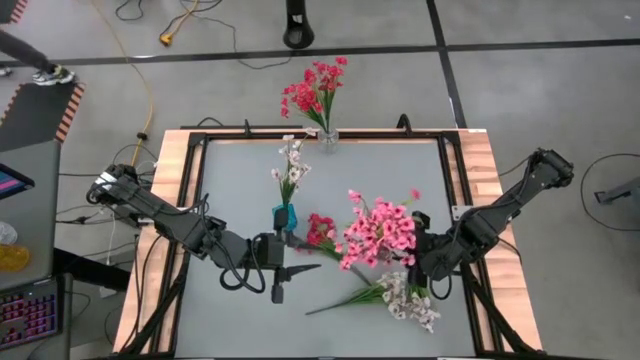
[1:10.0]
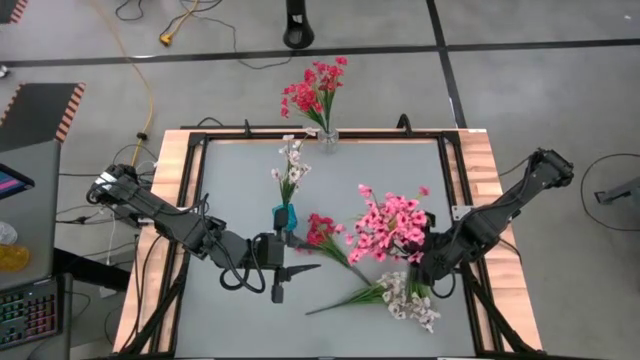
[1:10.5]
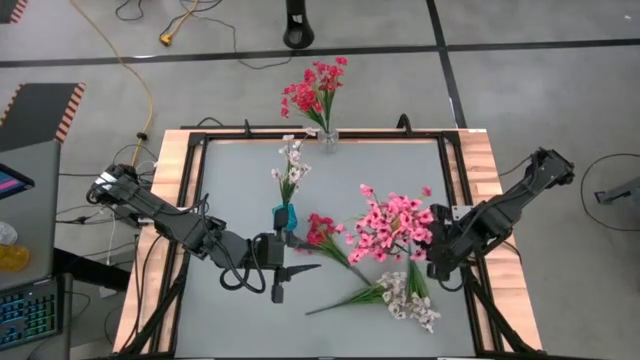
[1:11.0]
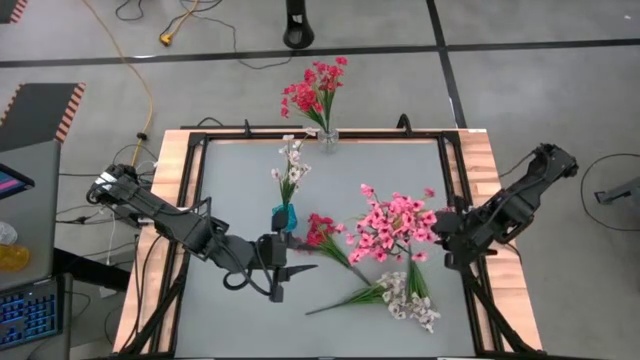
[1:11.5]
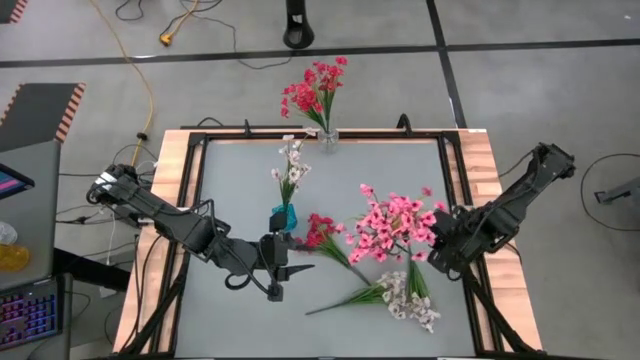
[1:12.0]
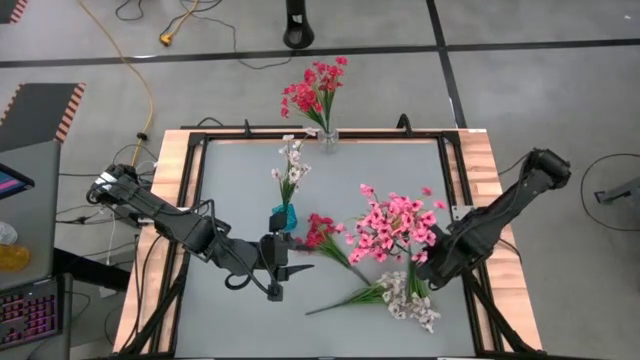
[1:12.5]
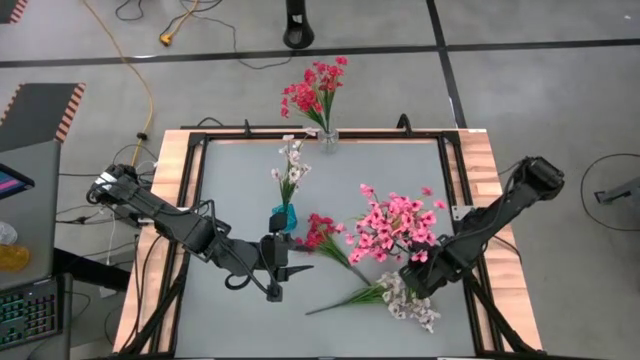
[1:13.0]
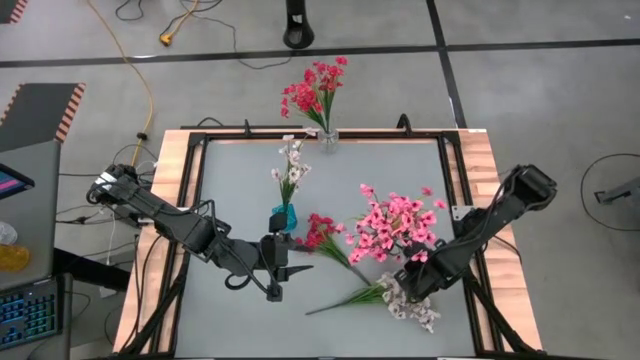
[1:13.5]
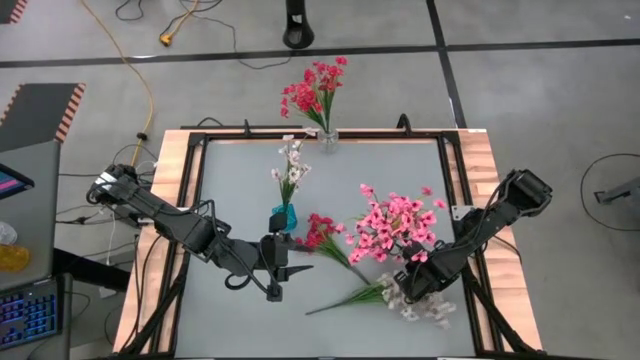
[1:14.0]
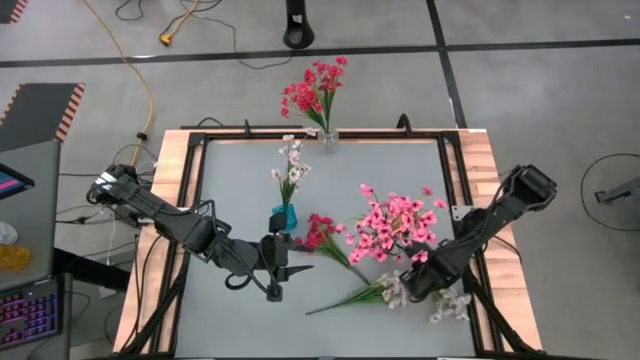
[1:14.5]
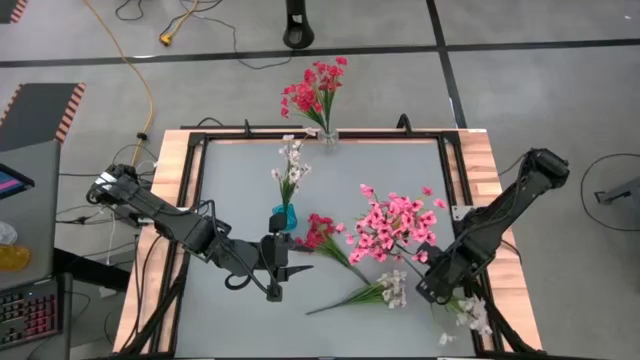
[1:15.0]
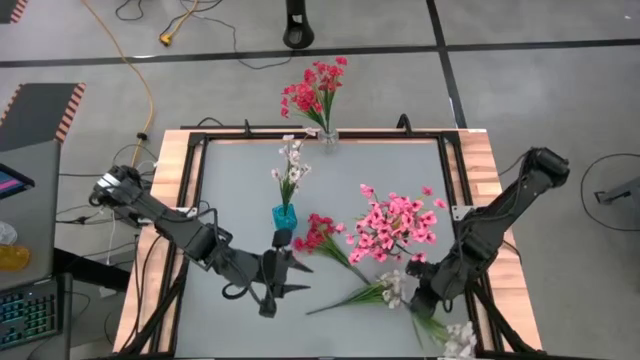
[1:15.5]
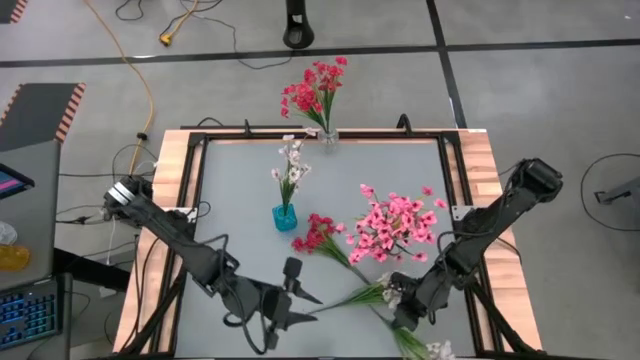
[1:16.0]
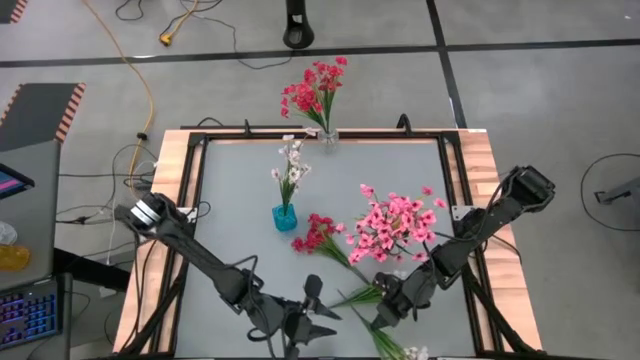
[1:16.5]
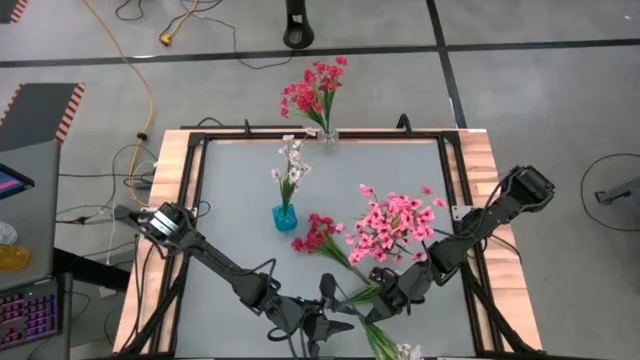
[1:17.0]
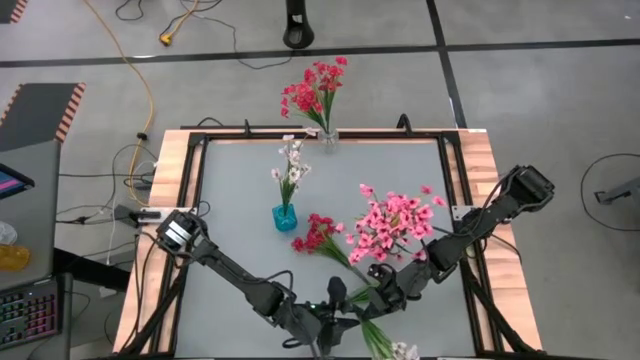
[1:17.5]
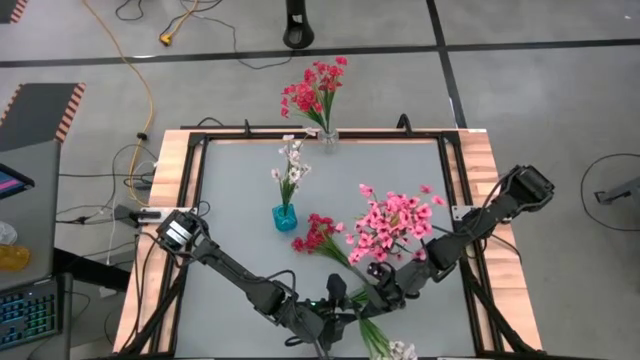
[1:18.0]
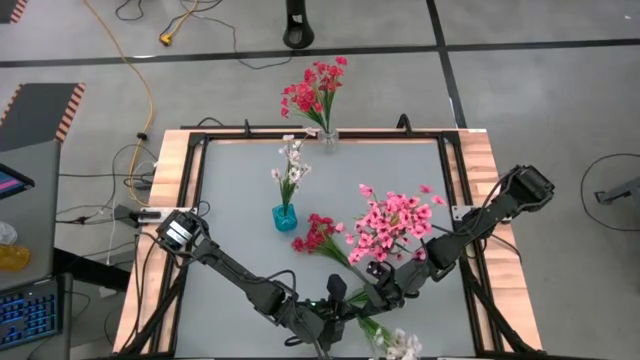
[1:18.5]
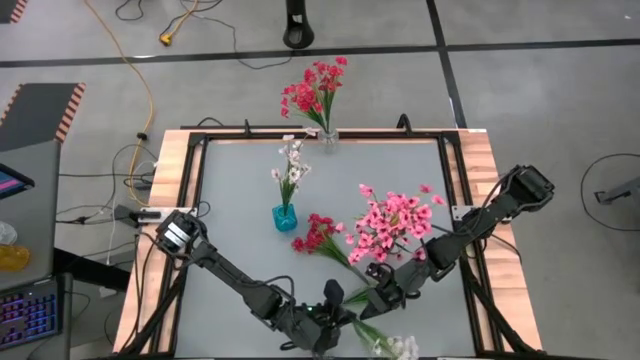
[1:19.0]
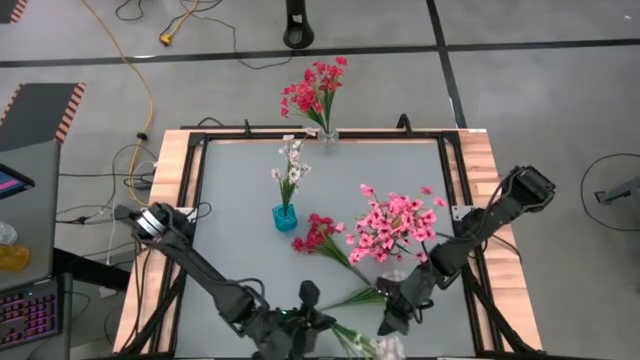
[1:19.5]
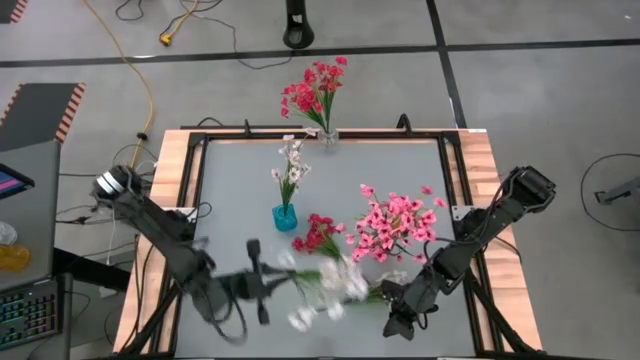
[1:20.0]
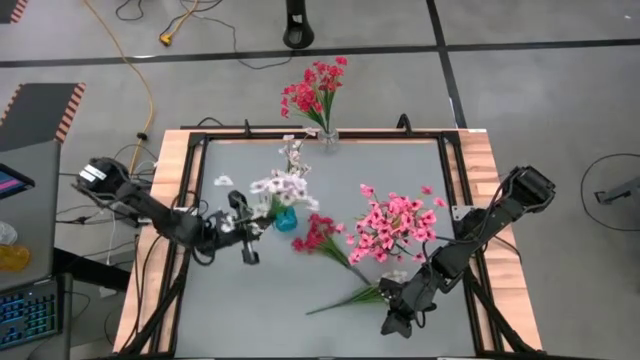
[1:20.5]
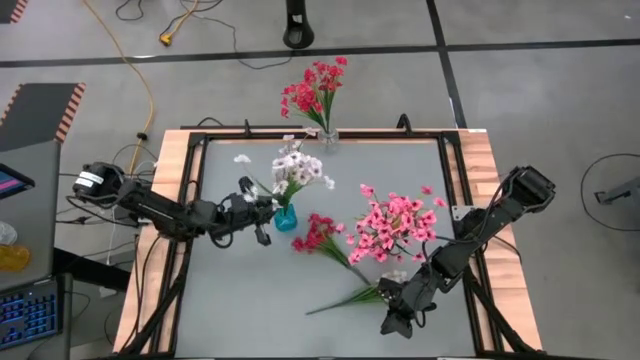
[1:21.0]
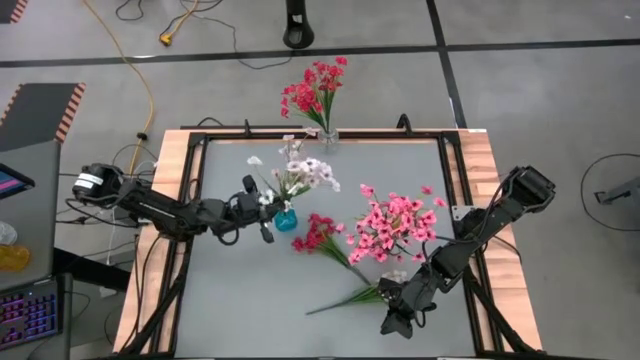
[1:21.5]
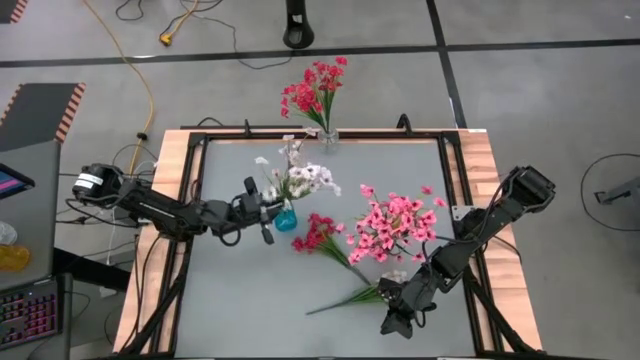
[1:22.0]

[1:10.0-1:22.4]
Task: Sort flowers into vase by color
Put the right white flower into the blue vase

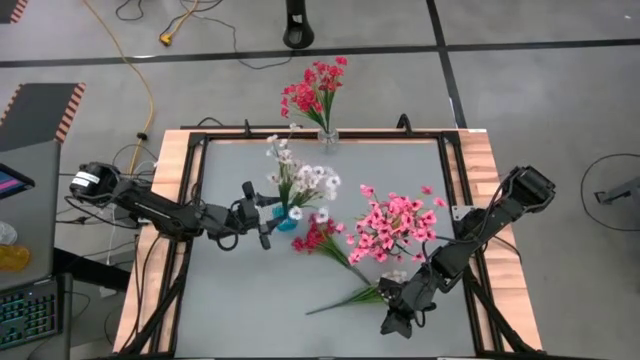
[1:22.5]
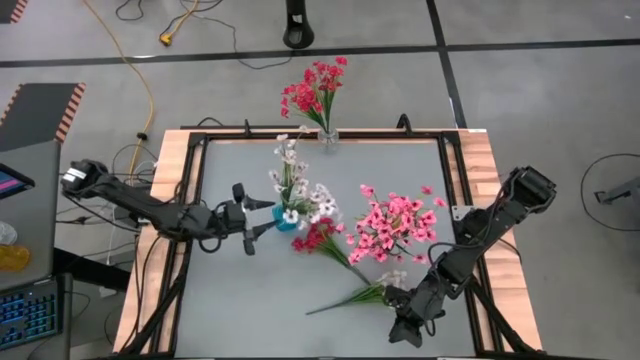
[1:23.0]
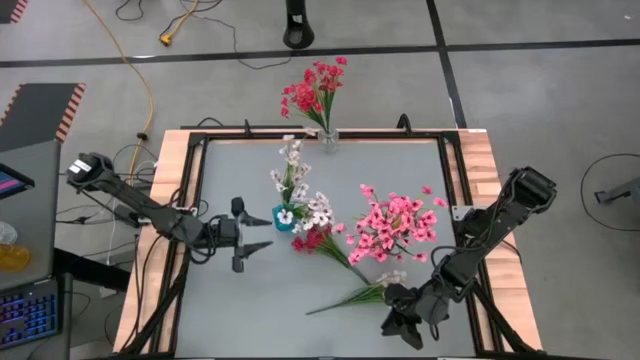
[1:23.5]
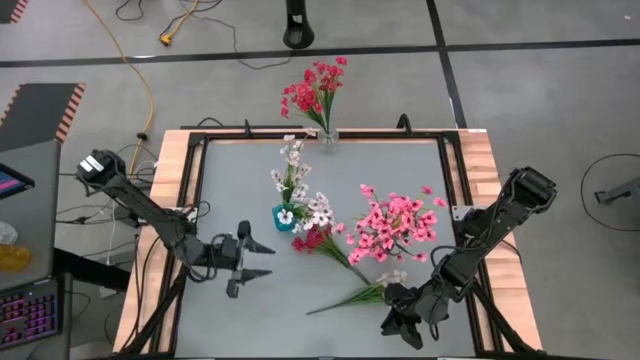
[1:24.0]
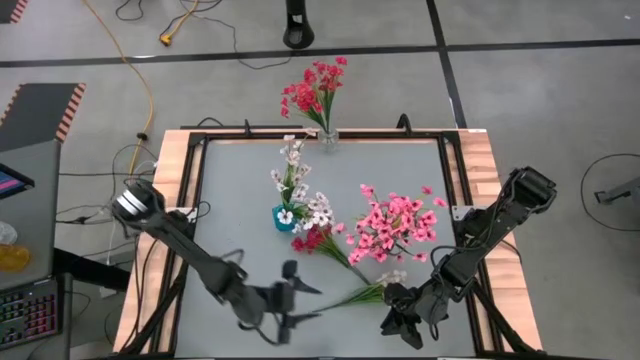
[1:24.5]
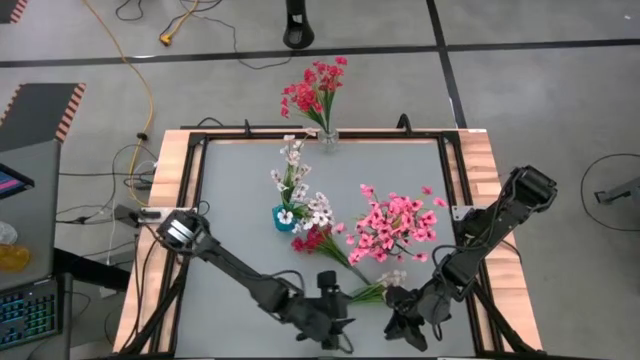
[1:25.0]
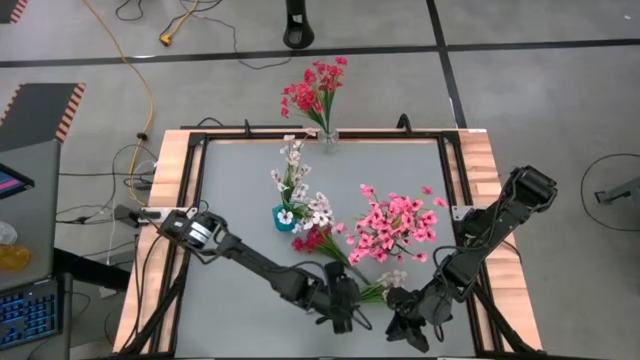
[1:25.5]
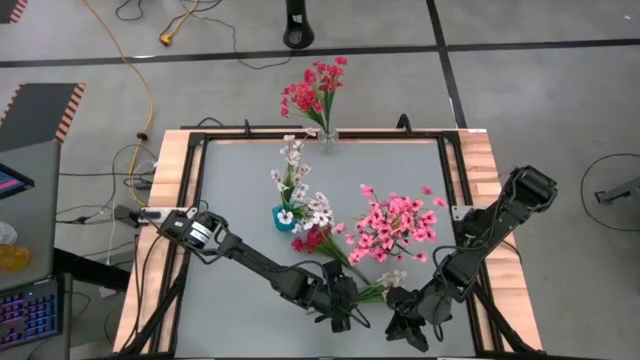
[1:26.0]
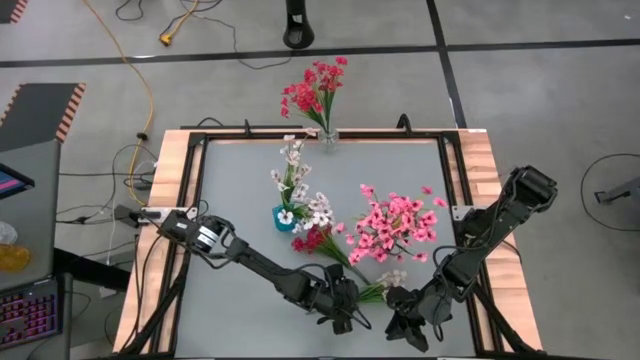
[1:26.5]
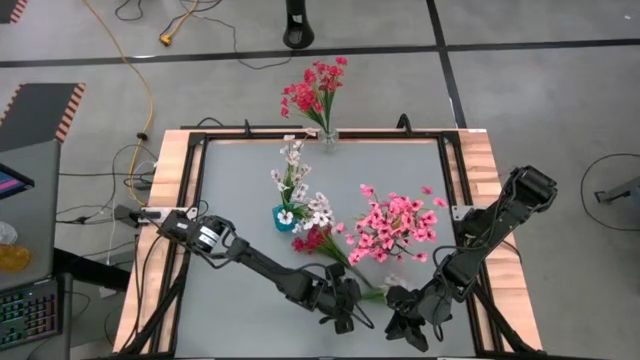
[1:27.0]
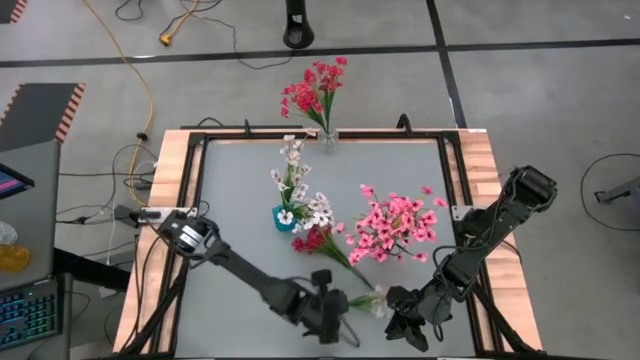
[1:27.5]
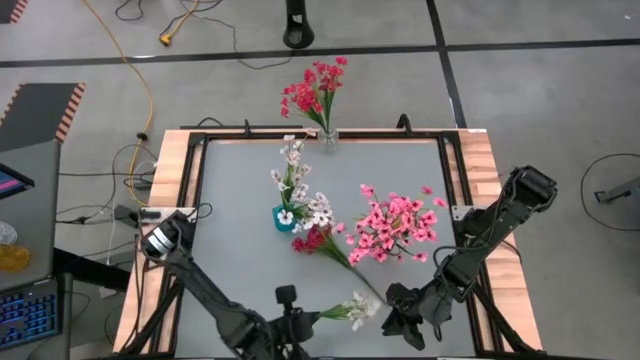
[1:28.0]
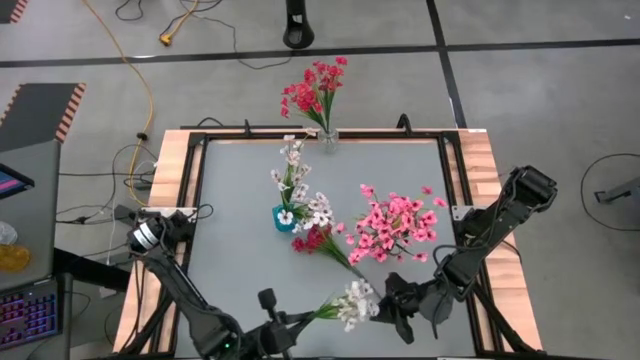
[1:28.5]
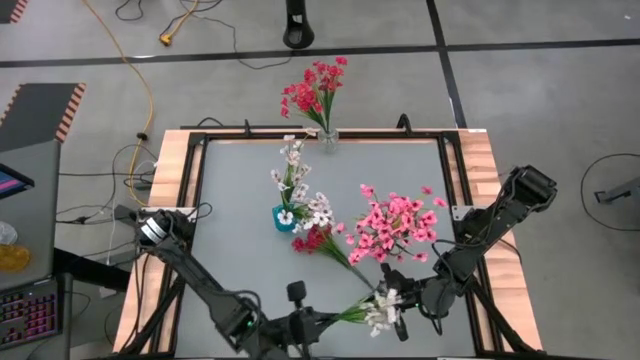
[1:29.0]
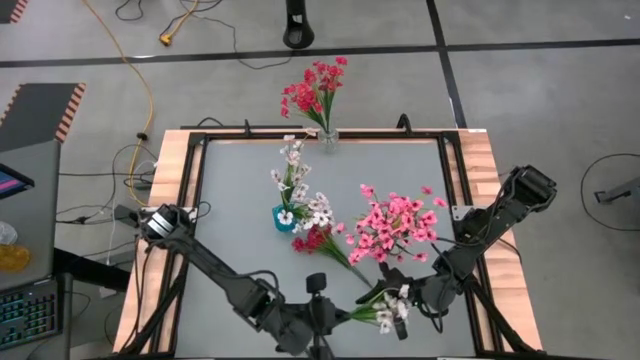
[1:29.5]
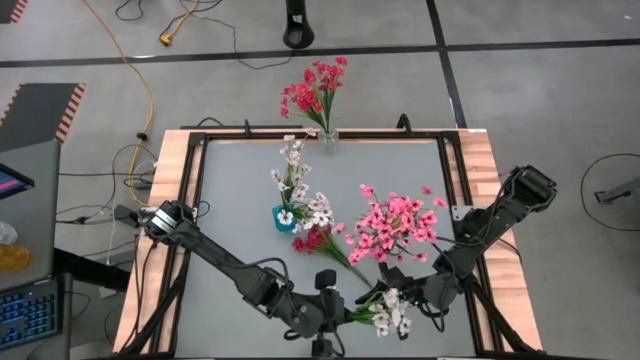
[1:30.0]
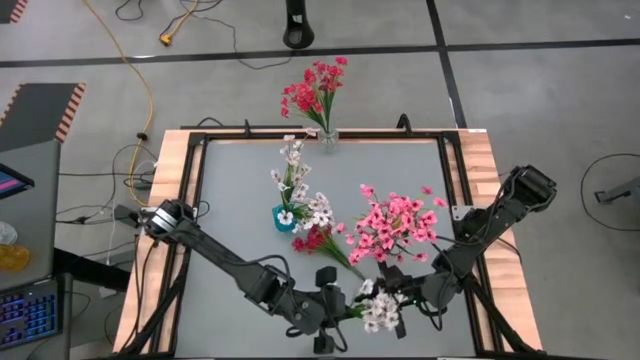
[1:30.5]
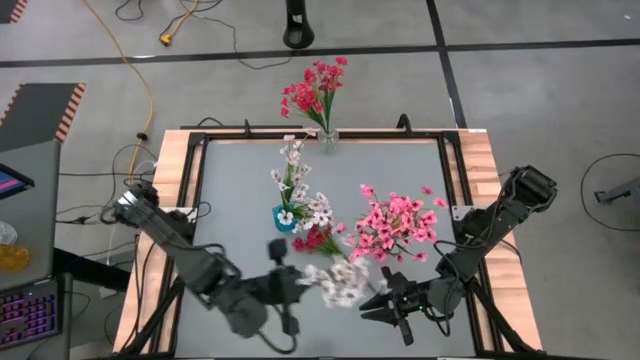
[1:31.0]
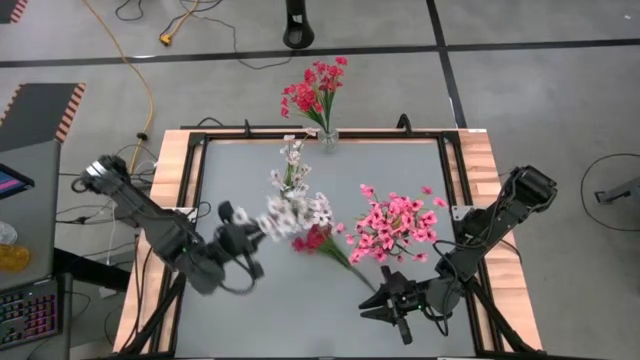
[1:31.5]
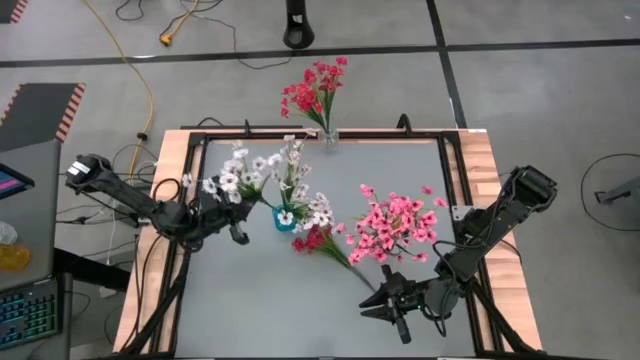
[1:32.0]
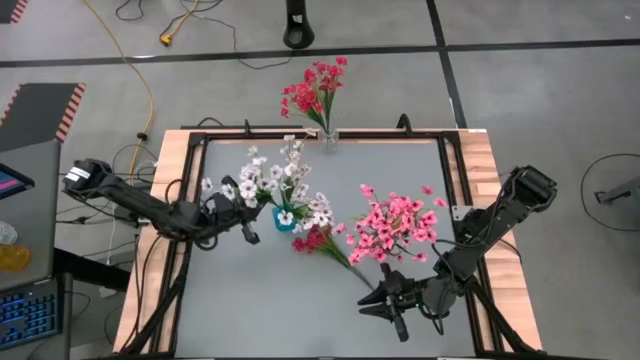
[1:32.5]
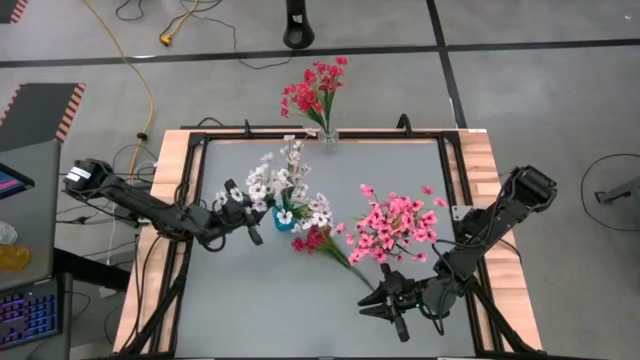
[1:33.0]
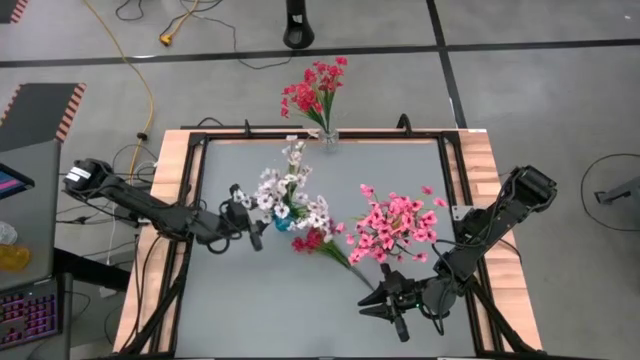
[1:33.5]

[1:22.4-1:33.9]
Put the white flower into the blue vase
